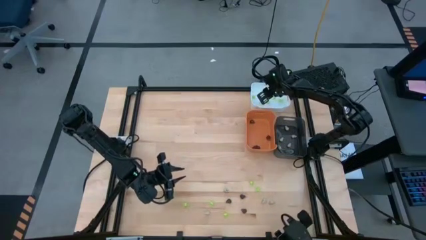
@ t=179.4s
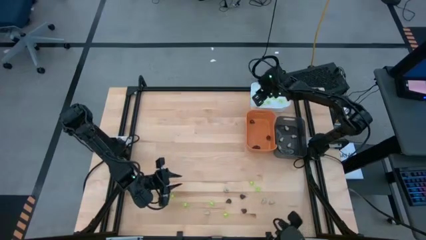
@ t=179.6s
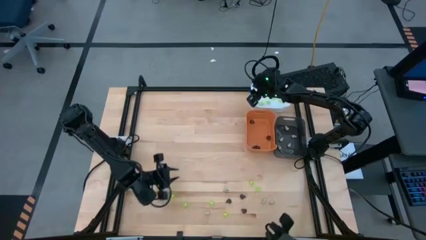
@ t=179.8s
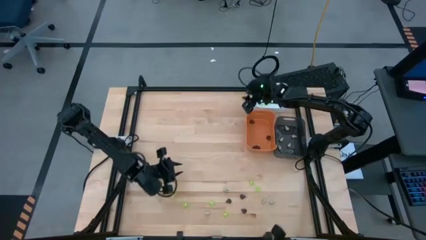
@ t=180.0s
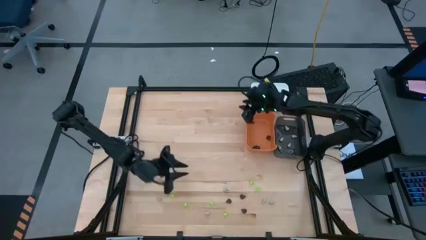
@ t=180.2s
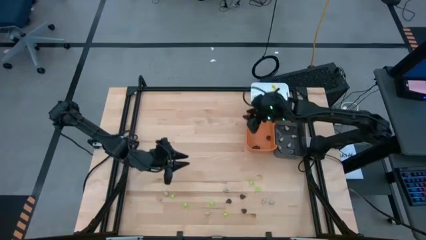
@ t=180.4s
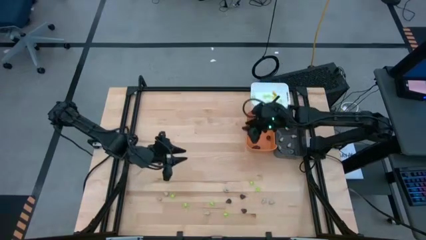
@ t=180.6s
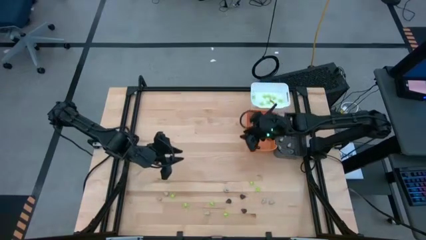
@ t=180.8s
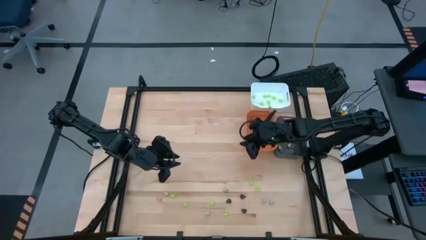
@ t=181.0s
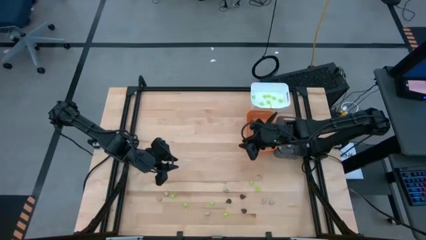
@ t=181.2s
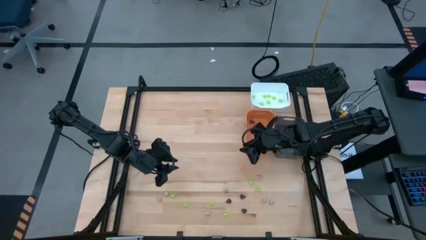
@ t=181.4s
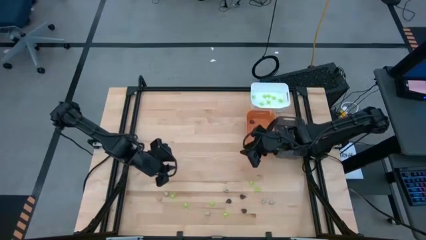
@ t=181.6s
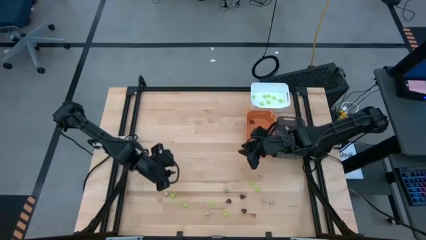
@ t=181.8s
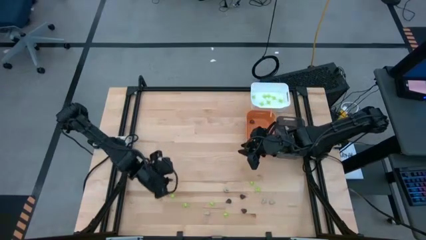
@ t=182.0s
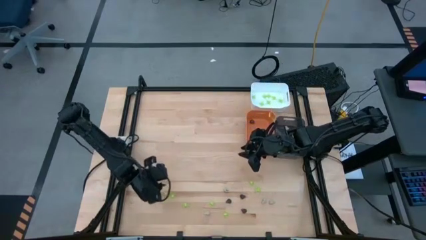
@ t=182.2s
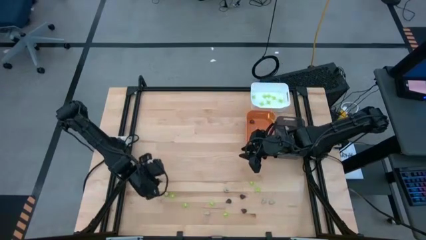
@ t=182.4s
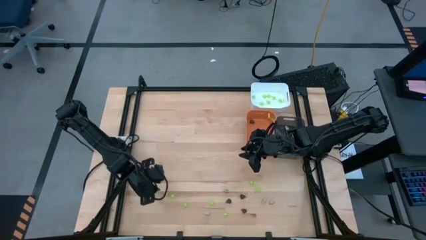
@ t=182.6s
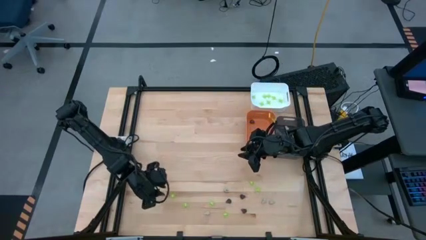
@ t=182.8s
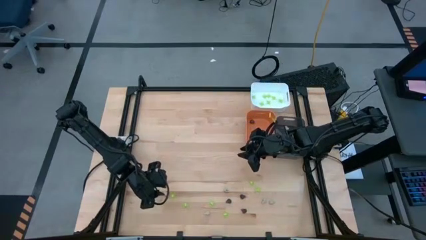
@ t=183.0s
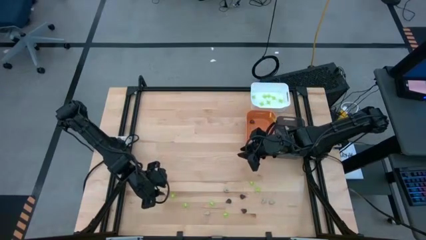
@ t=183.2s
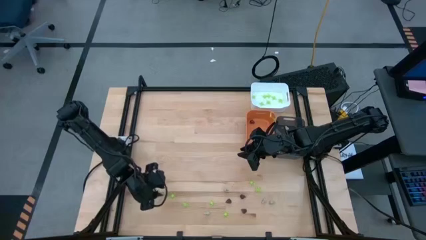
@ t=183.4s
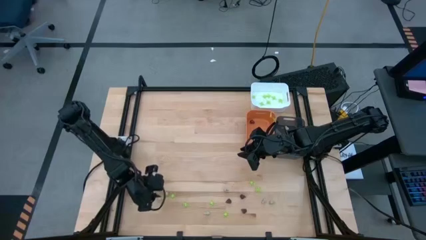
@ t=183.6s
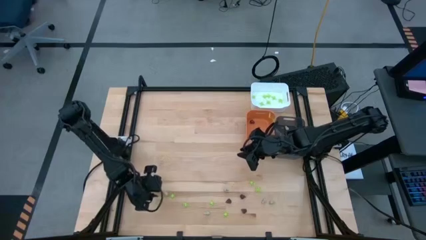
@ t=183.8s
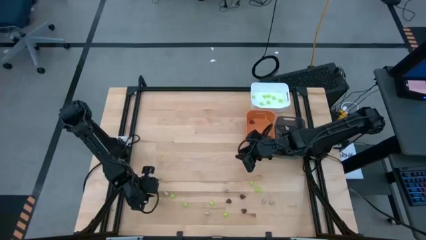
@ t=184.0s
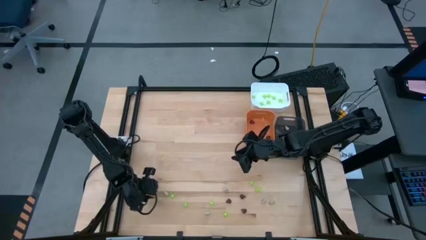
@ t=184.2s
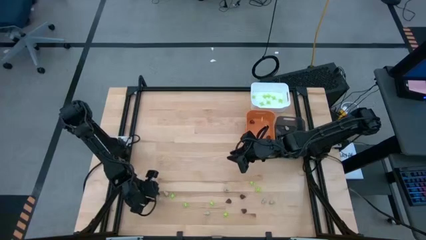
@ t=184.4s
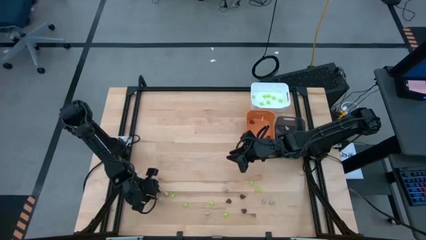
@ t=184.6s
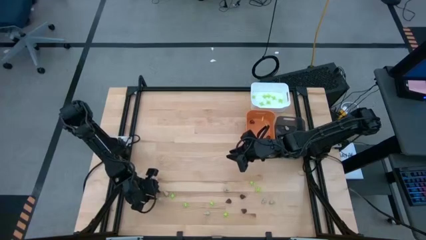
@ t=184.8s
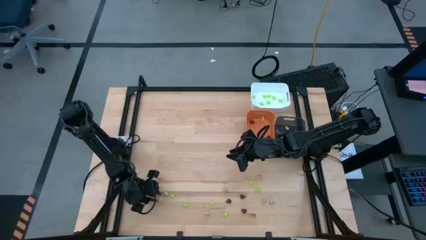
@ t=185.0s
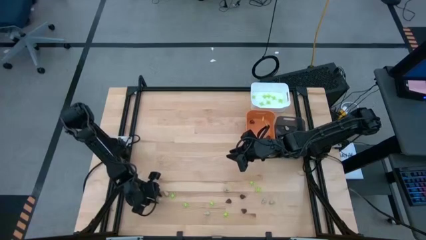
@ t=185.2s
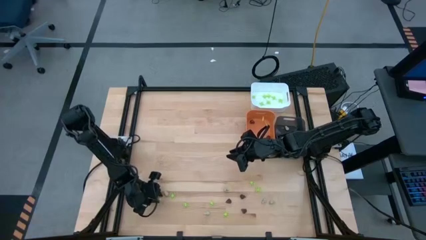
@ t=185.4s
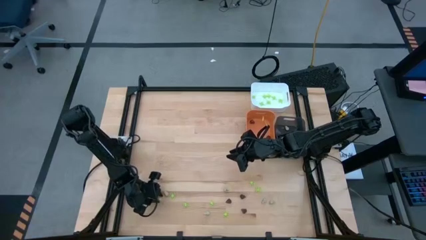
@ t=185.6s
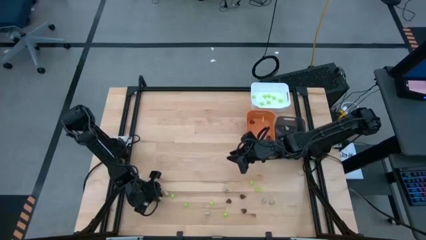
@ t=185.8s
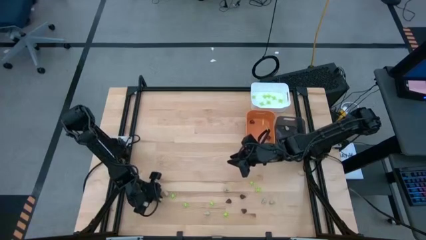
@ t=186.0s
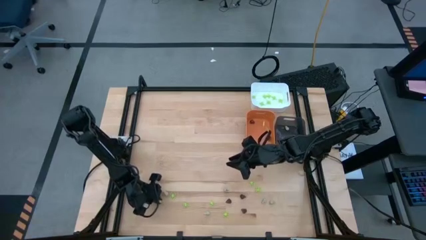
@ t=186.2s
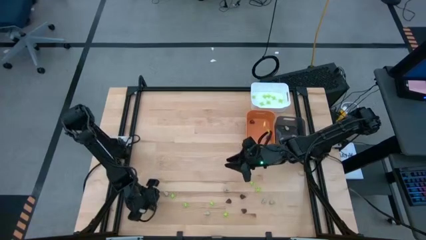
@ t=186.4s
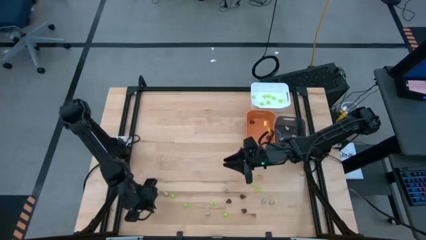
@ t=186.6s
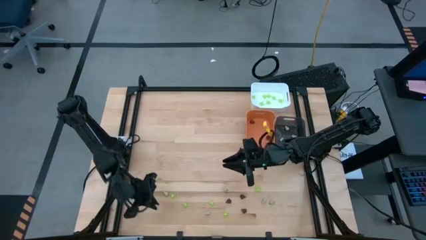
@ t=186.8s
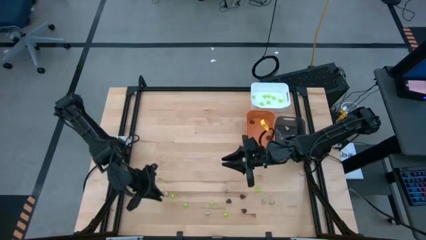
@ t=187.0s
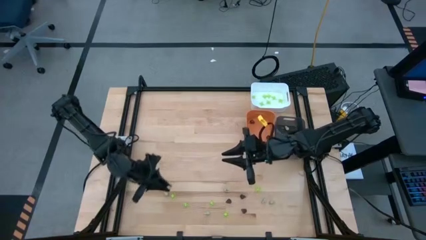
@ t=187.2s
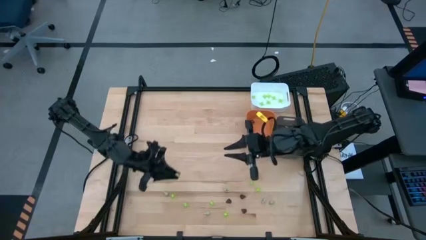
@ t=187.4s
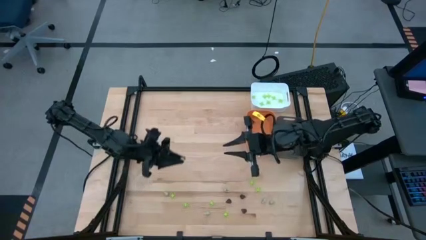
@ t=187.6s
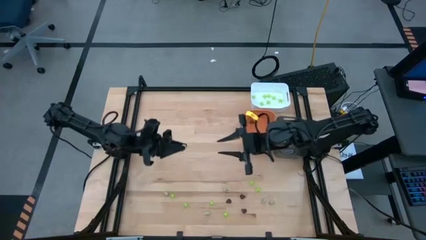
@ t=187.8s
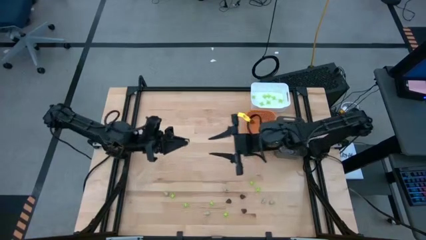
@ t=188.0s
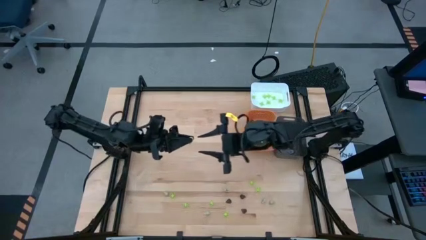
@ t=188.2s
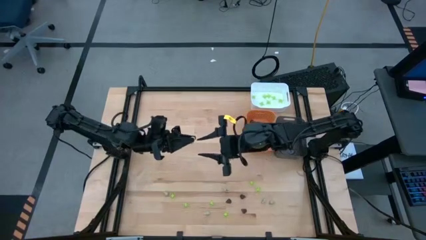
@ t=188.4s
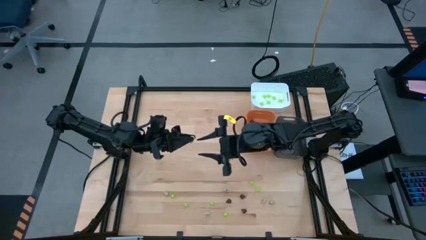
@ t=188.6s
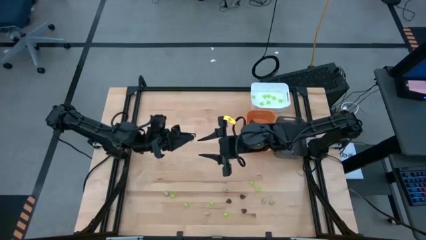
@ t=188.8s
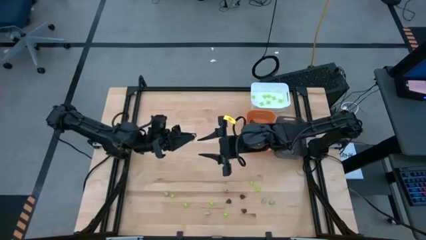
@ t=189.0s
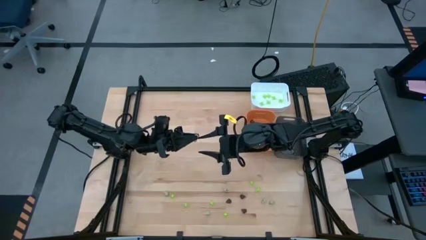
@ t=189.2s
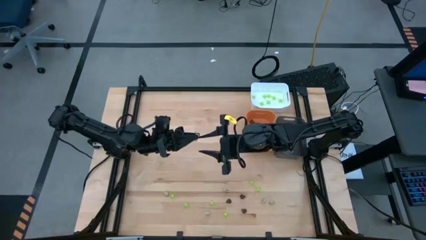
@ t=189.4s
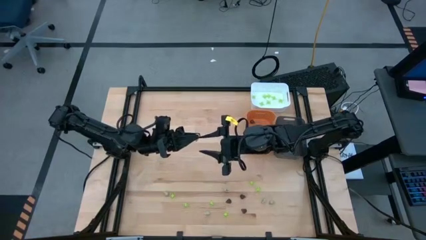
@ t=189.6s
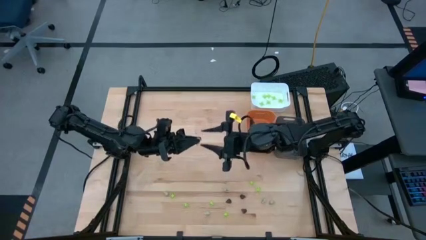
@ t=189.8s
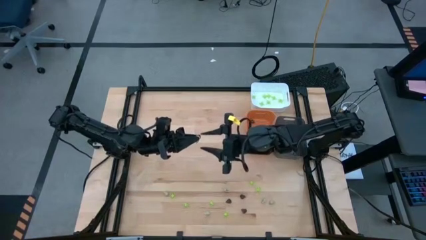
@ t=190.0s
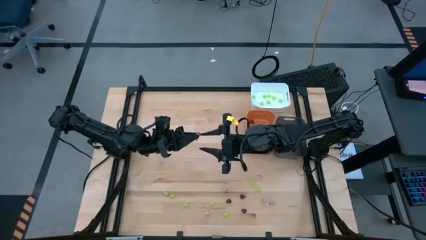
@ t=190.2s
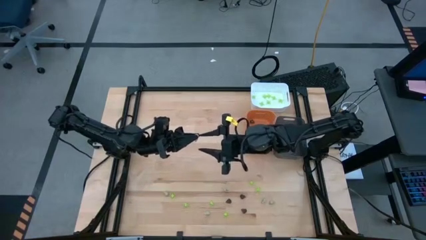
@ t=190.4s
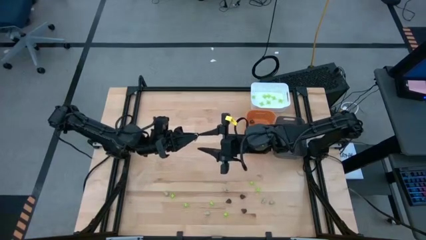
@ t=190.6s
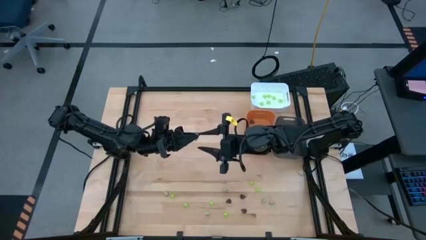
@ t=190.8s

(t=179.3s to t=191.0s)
Task: Sort Halloween decoration
Put the white skull toy into the black bin

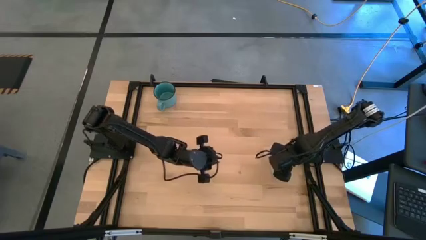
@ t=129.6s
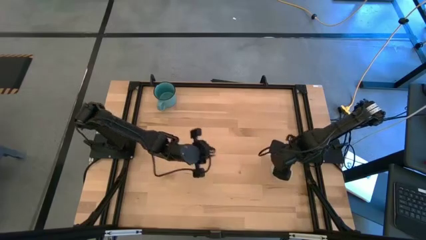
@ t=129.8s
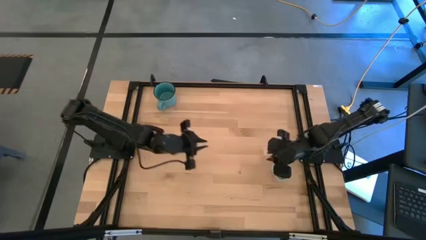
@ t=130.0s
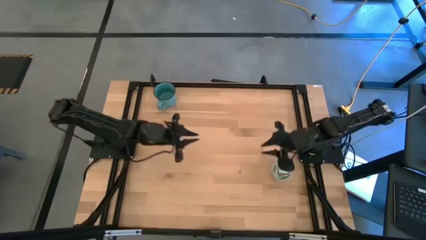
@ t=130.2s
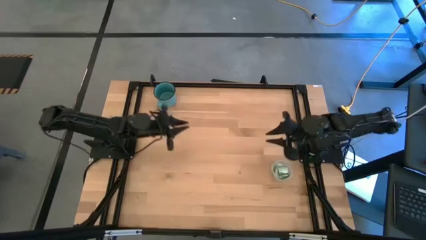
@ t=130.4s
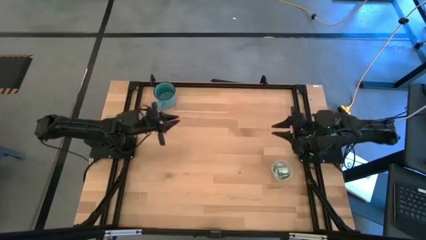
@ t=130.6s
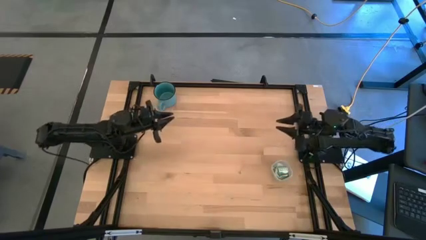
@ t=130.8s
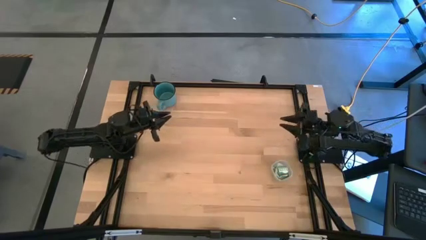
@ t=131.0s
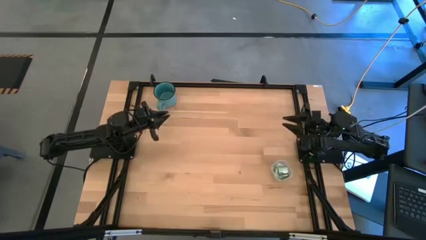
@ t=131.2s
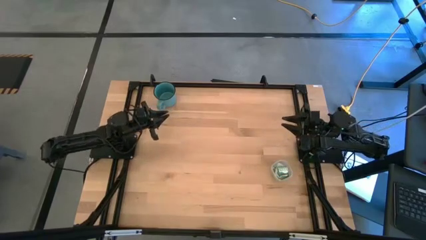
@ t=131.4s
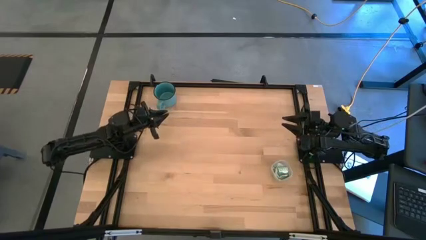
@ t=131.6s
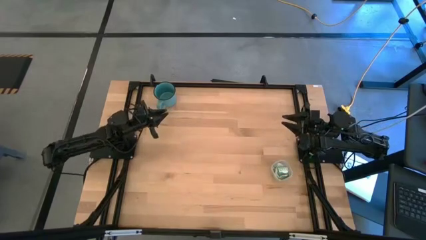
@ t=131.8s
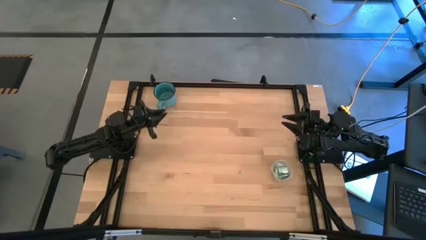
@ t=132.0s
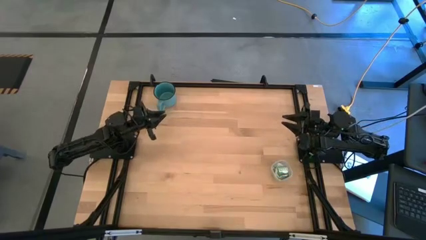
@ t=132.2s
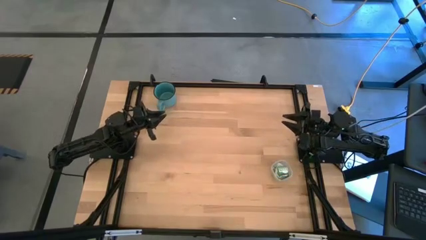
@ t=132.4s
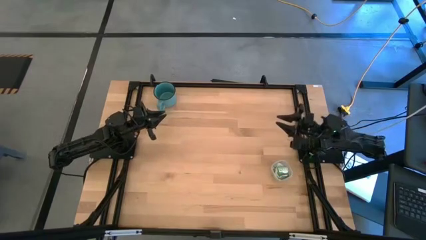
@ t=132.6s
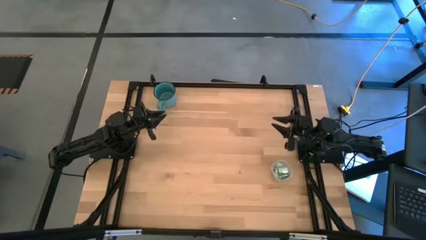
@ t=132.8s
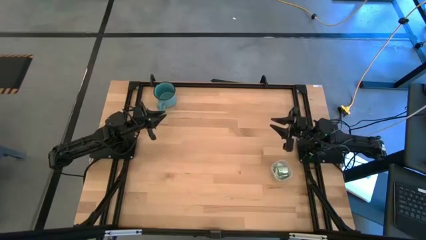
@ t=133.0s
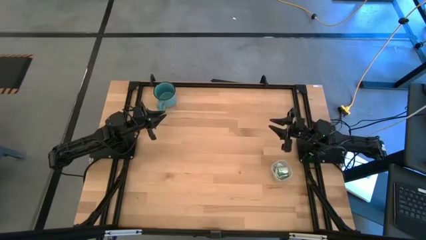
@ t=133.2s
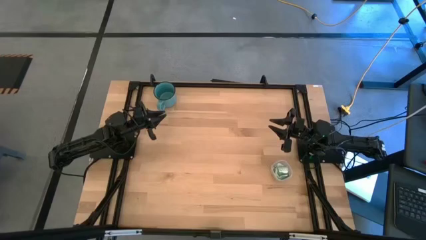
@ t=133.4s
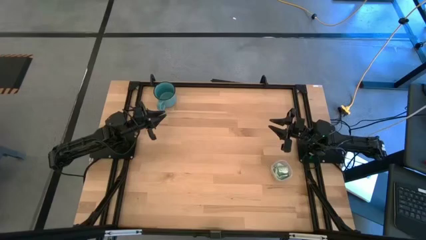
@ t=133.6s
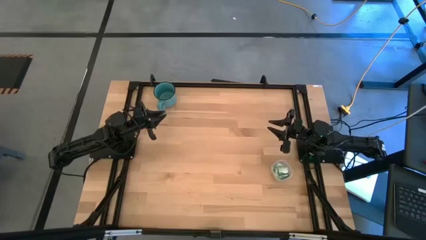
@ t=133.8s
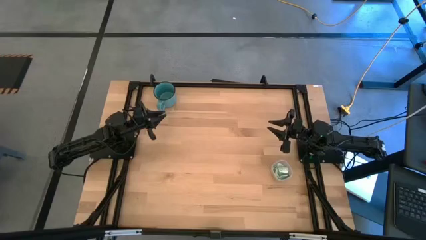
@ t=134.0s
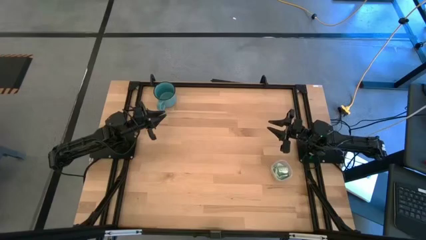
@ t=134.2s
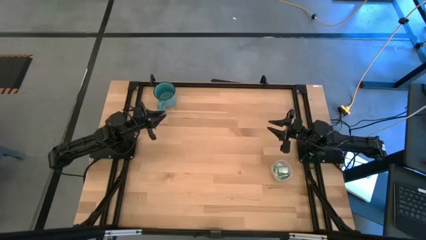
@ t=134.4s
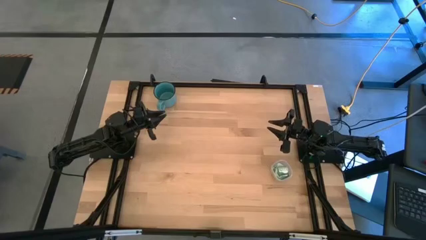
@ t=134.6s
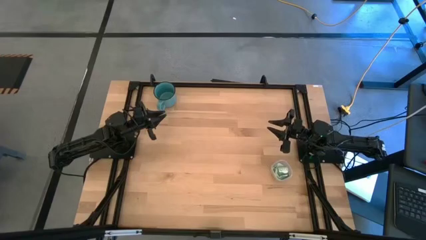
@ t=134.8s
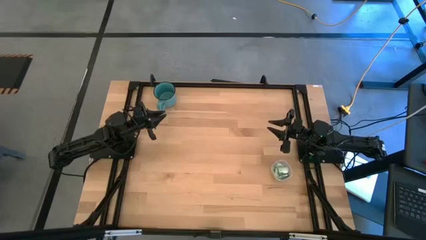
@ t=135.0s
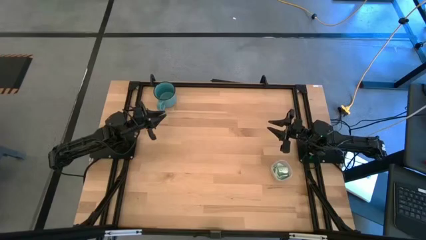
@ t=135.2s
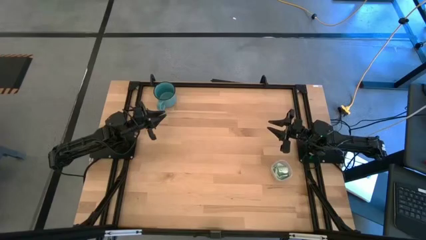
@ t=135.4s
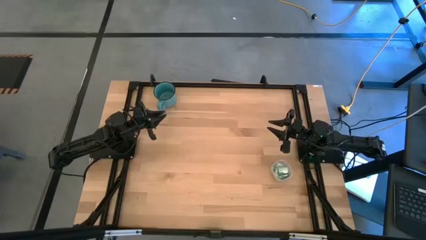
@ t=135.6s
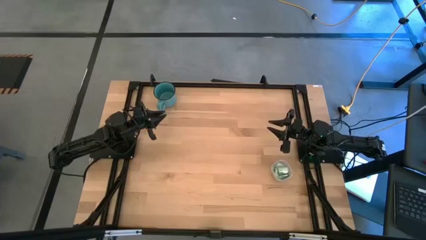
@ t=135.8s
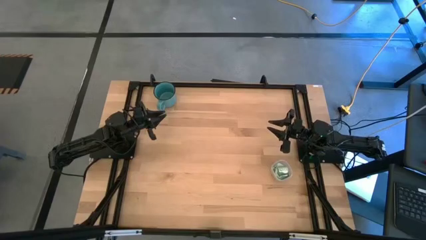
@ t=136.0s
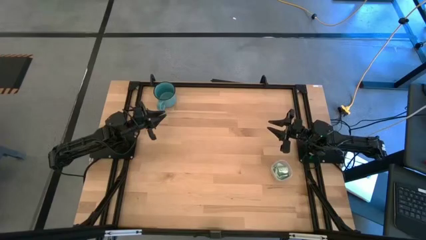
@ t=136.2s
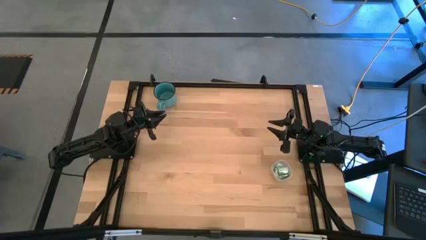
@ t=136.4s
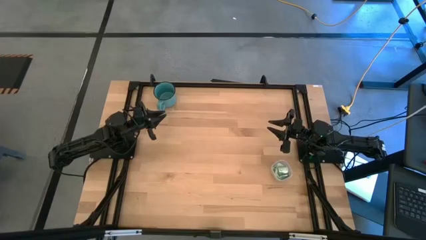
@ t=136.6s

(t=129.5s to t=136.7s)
Task: Pick and place items into bin
Return to Home Position
